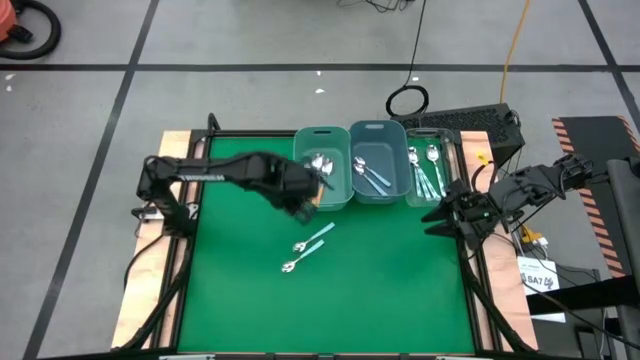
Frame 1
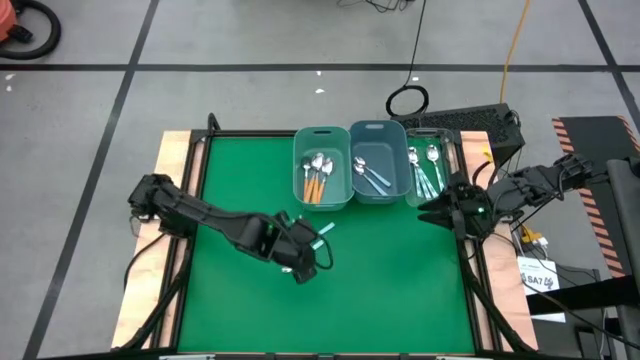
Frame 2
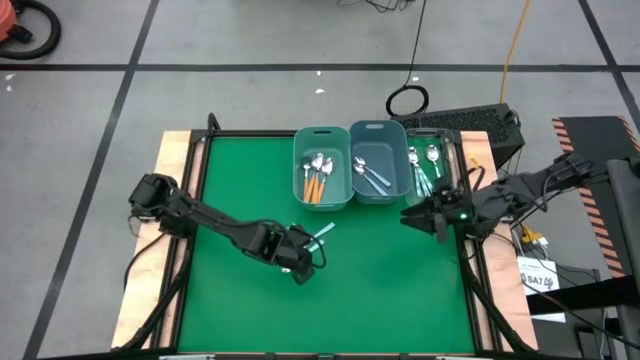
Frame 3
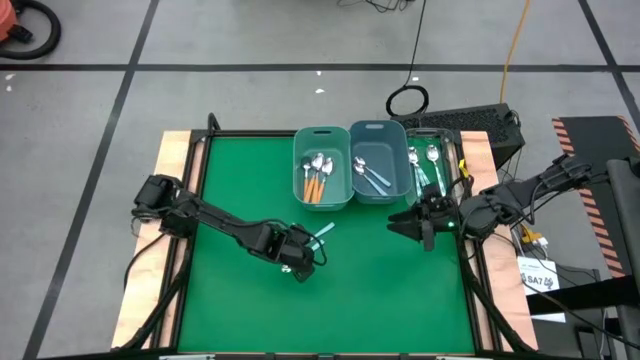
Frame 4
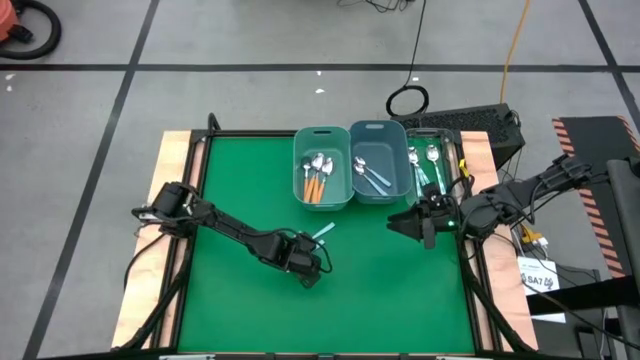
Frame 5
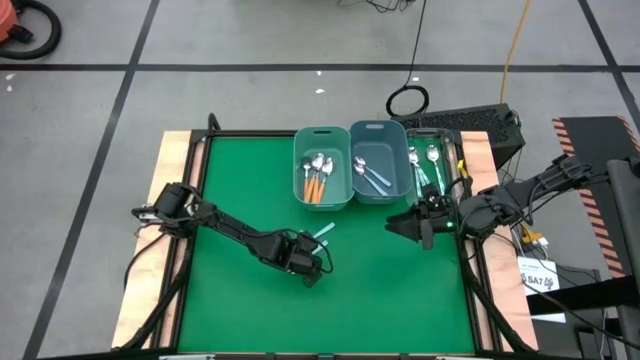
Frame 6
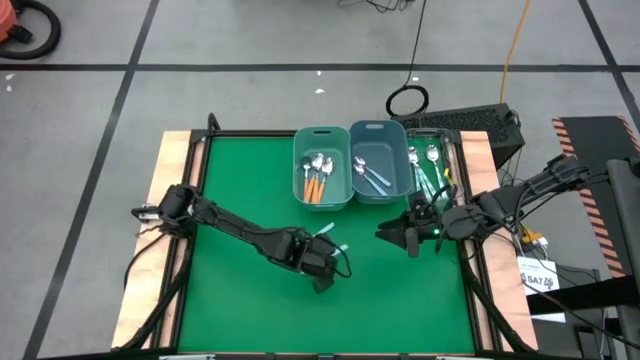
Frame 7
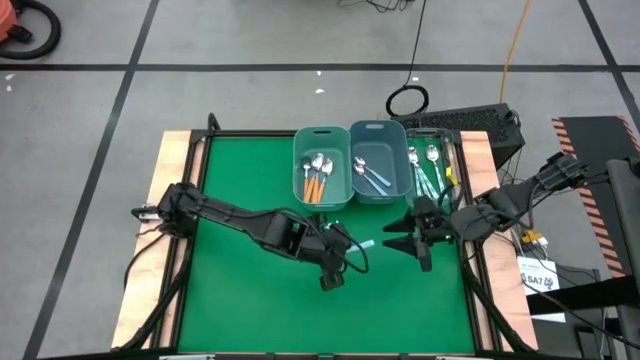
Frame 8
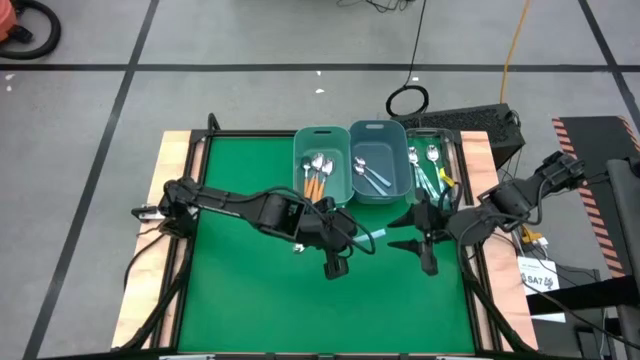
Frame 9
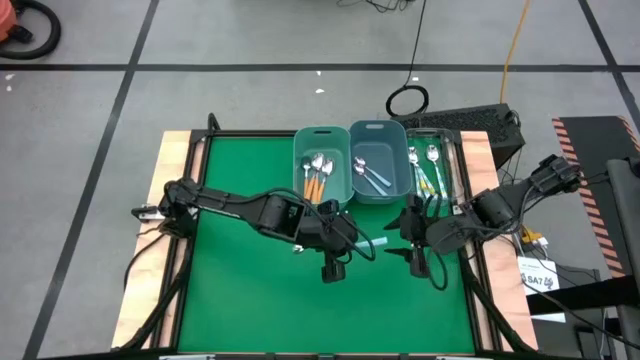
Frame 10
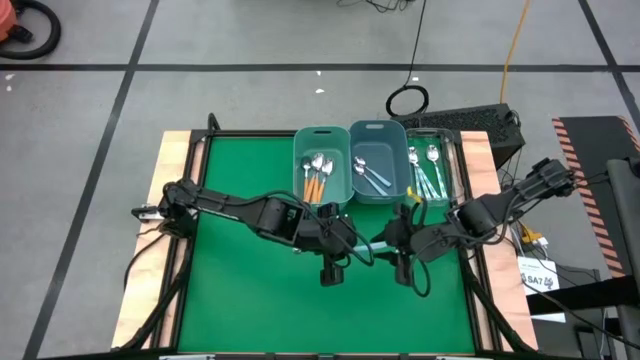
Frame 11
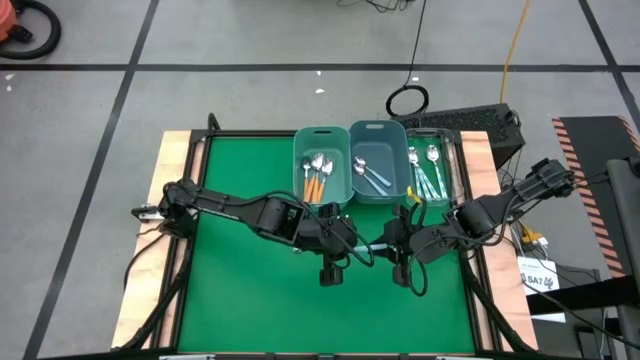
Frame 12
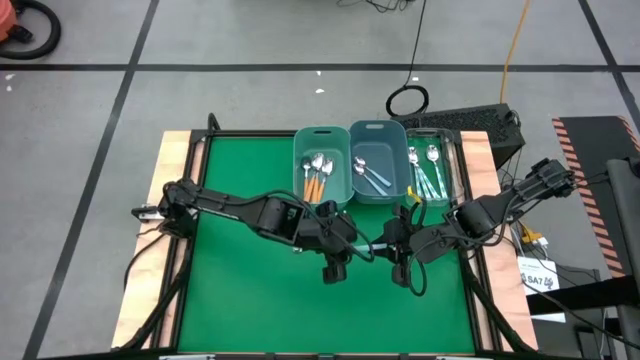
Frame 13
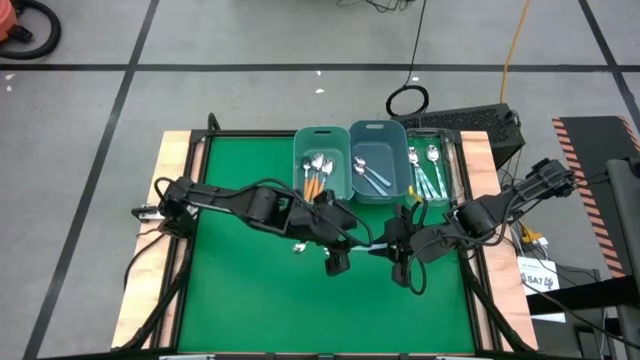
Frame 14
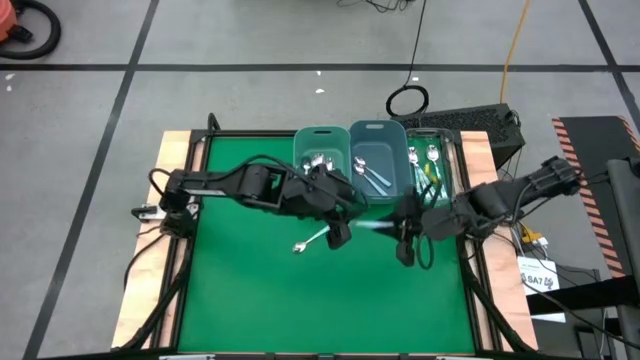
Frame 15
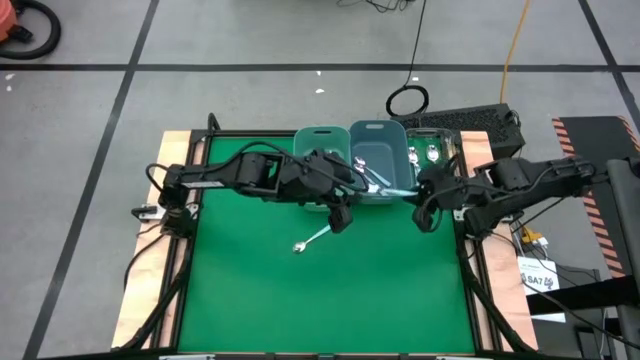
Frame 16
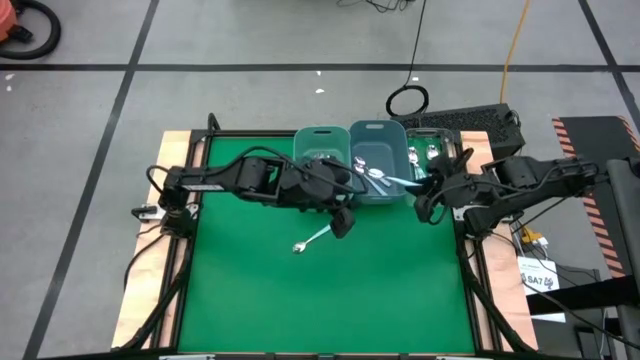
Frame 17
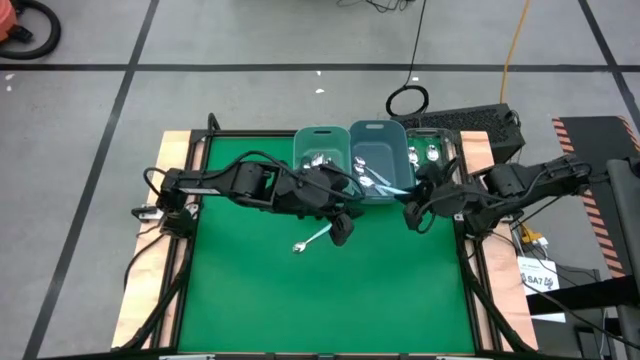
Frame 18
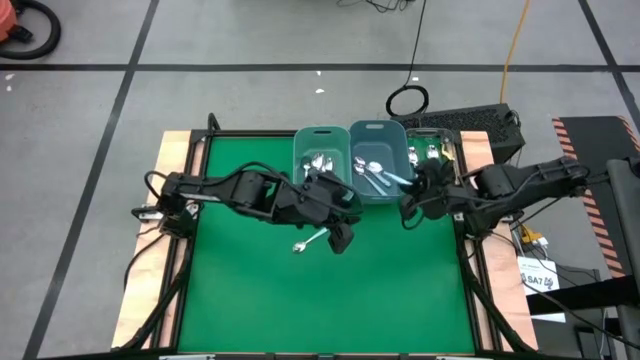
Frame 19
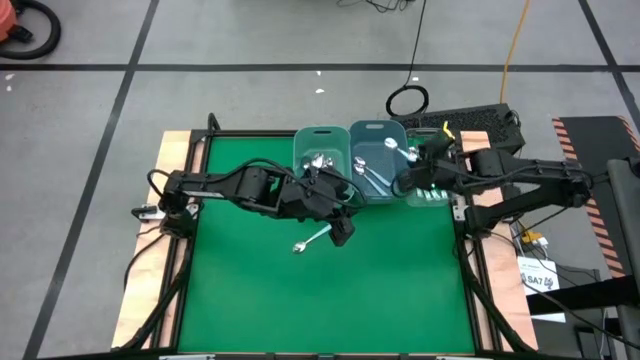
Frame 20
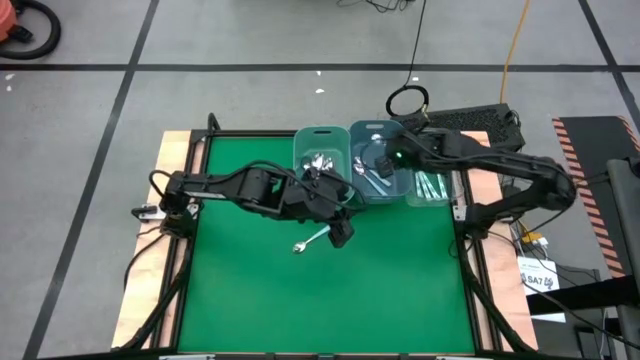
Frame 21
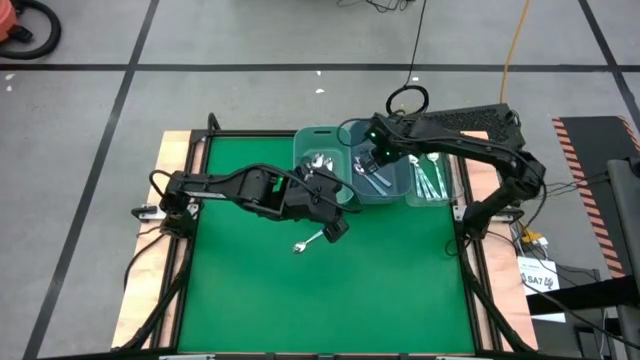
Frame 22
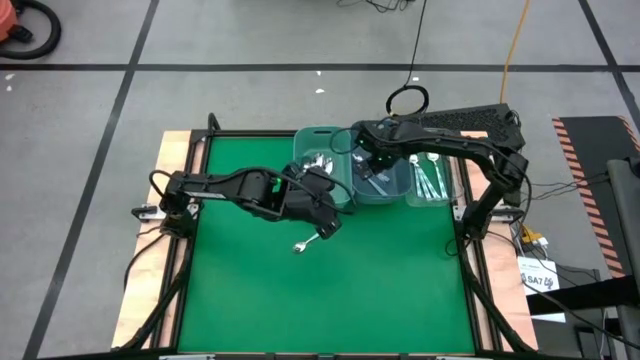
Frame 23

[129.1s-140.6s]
Task: Sort silverware by color (type)
Put the blue spoon into the blue bin

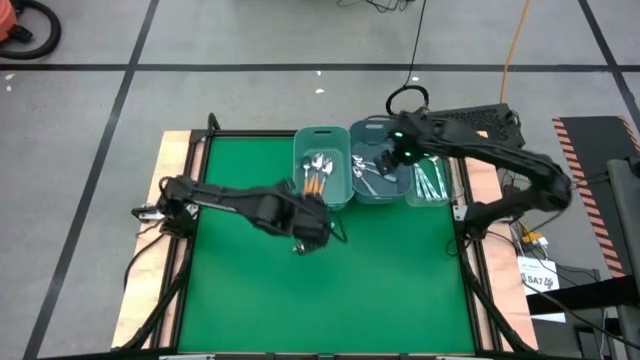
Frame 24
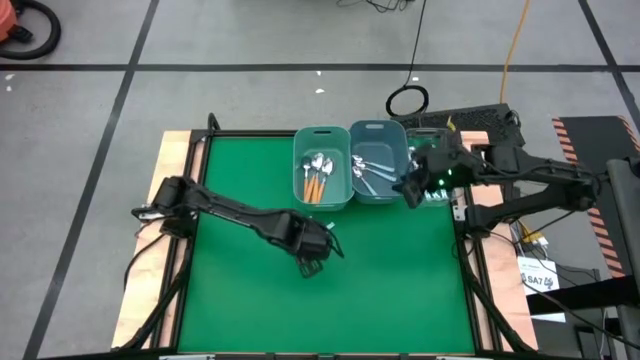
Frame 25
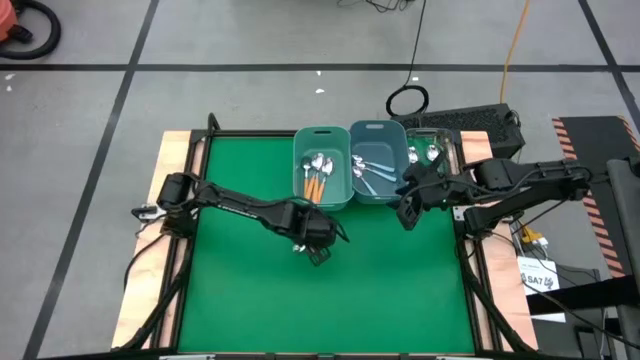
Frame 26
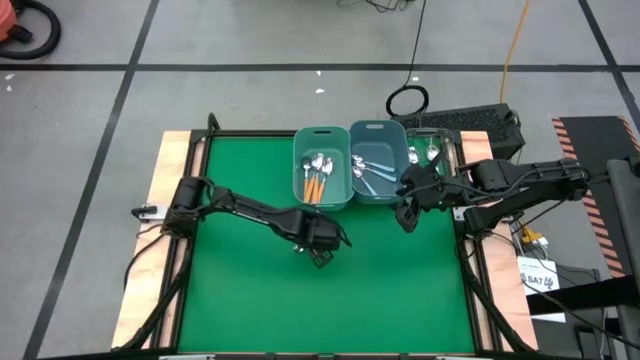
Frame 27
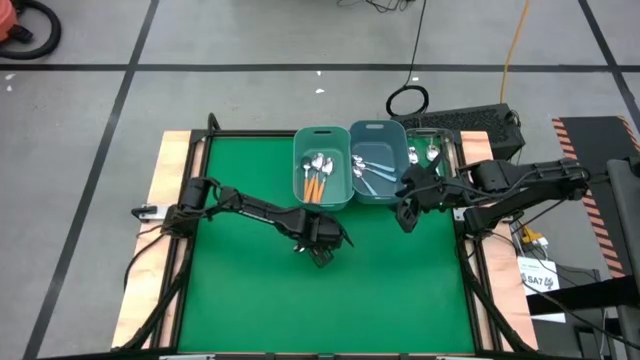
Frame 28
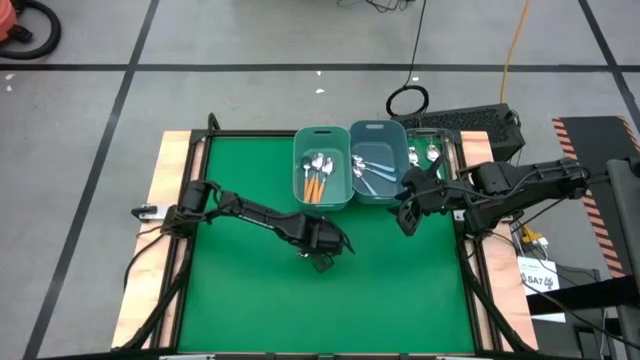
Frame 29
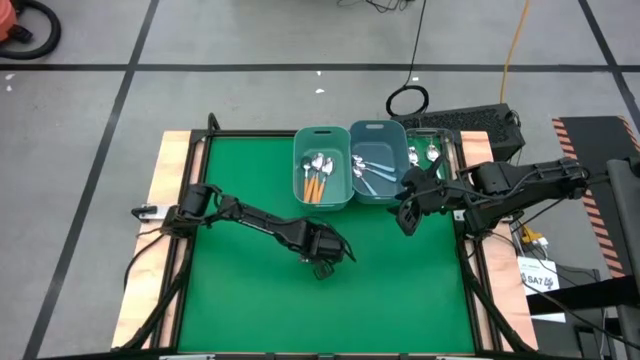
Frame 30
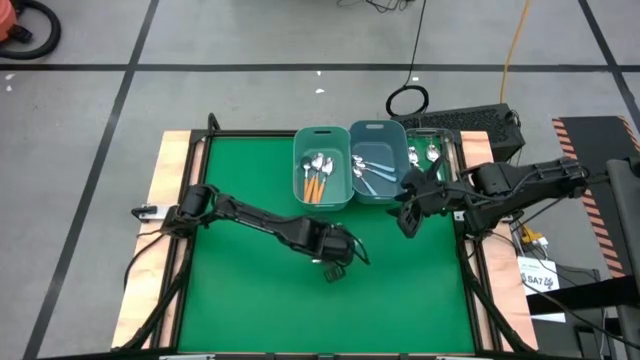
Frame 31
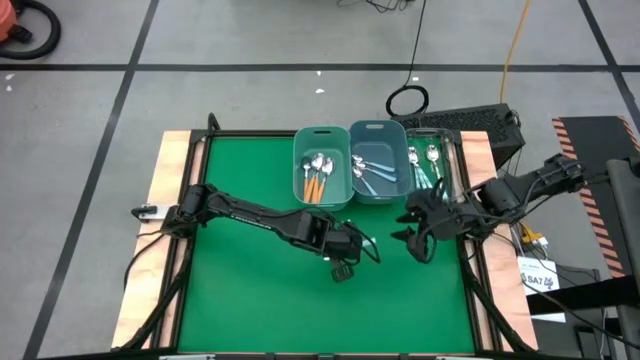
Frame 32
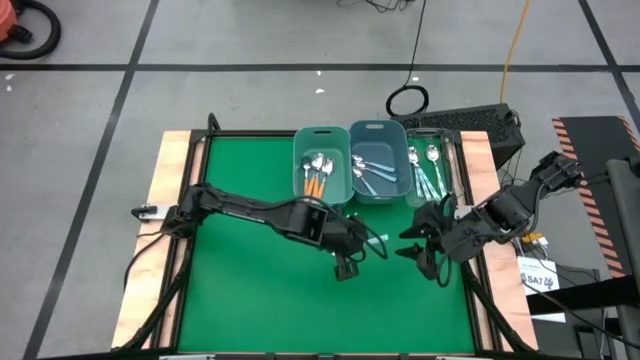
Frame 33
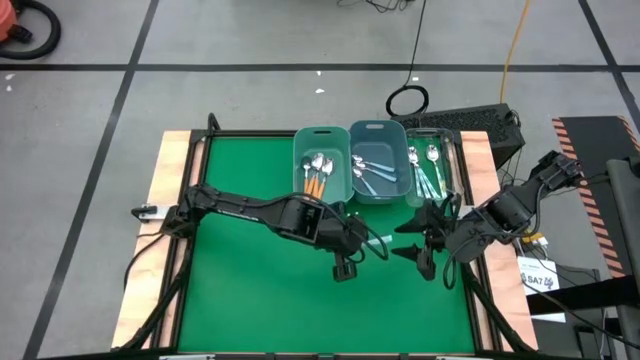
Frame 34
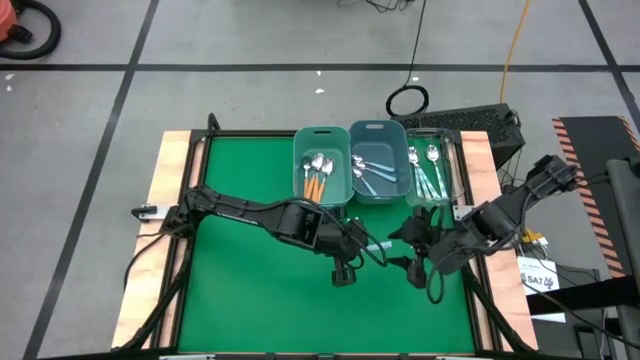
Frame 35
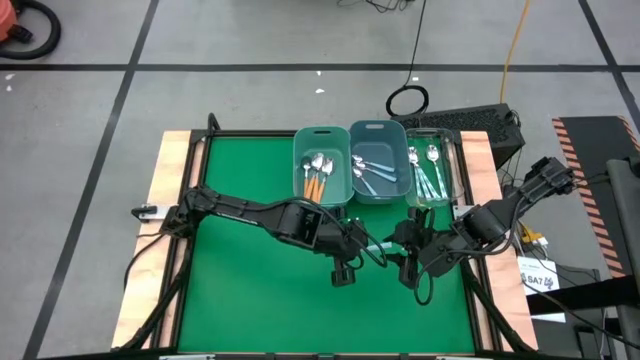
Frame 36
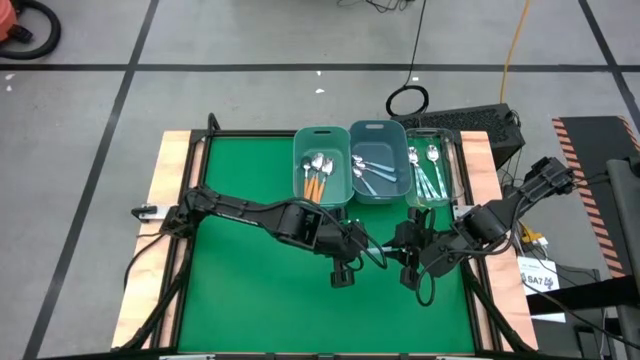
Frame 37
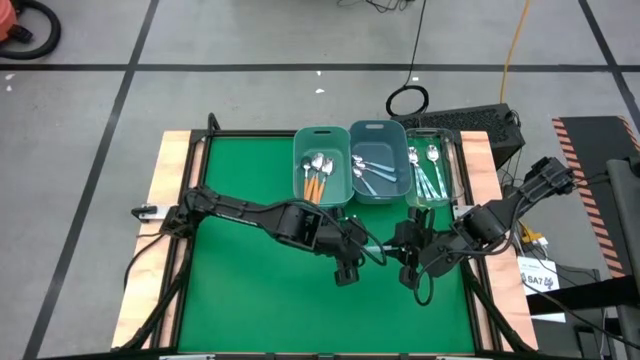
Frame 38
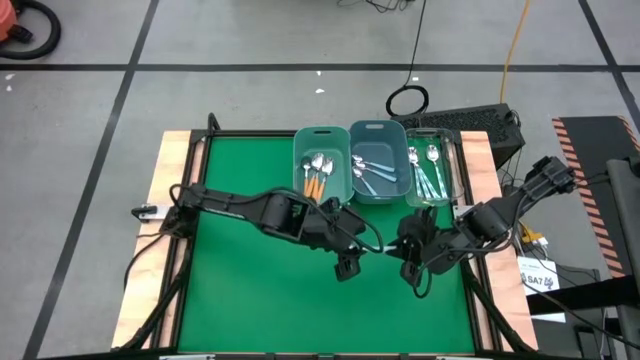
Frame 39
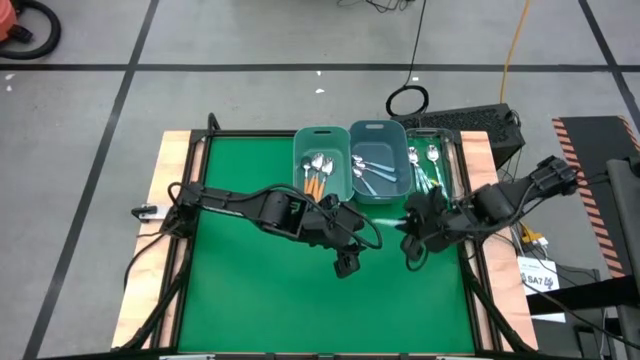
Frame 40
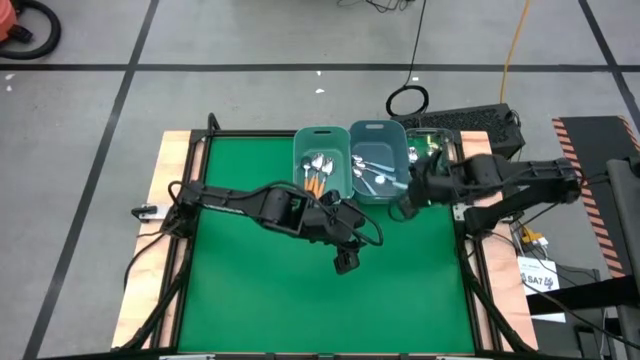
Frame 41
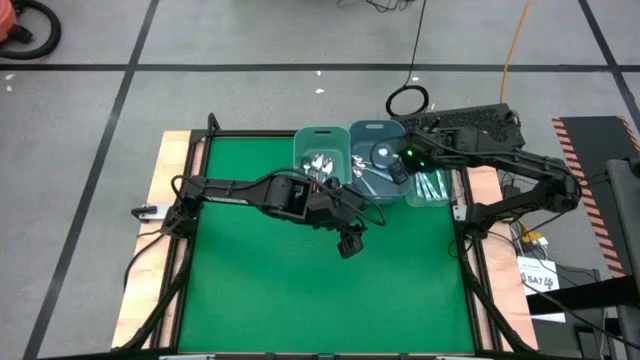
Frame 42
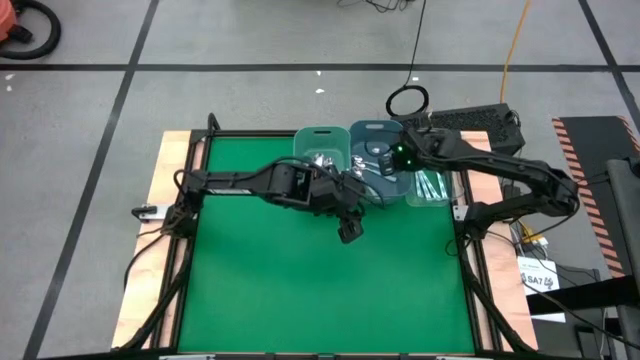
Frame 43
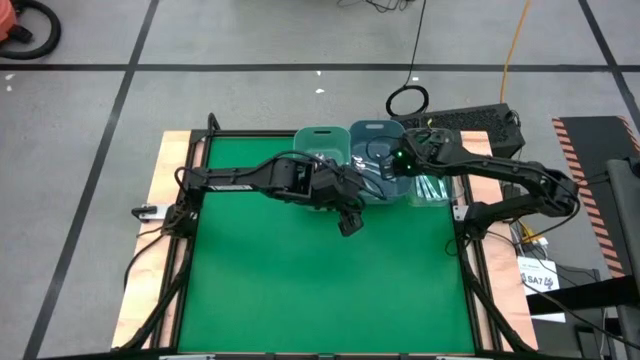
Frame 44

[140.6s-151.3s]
Put the blue spoon into the blue bin
